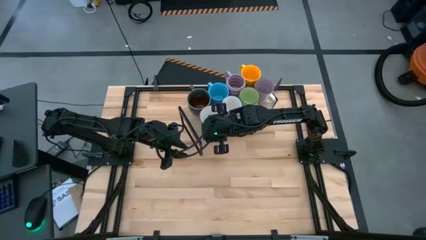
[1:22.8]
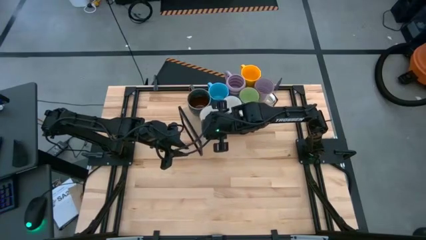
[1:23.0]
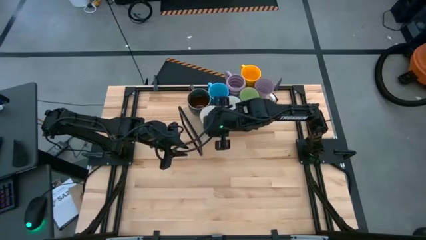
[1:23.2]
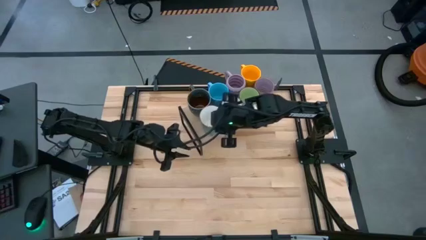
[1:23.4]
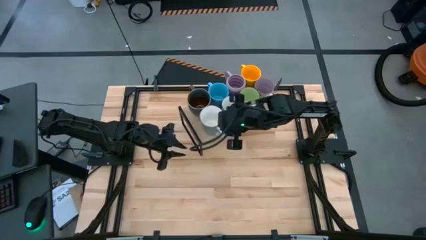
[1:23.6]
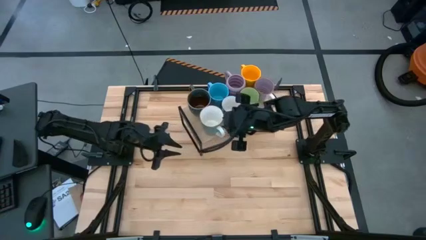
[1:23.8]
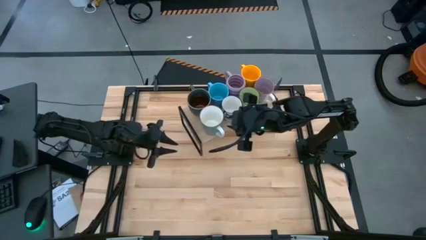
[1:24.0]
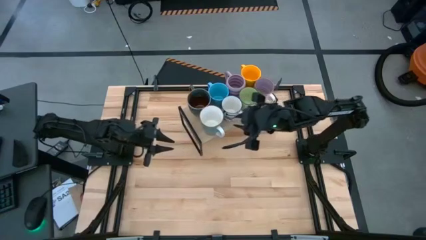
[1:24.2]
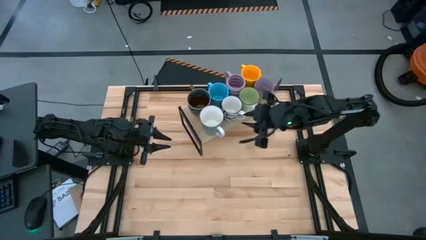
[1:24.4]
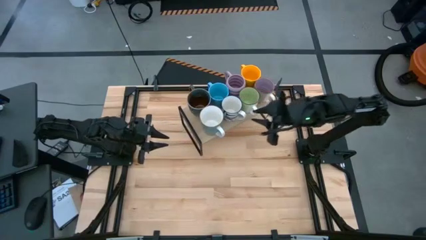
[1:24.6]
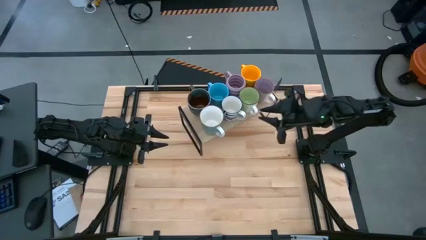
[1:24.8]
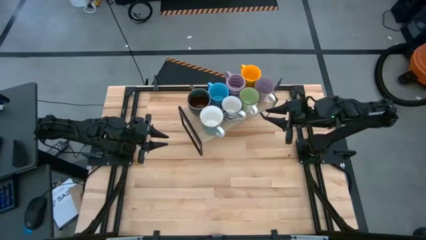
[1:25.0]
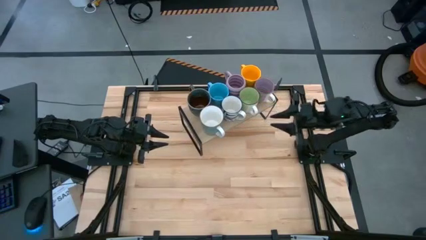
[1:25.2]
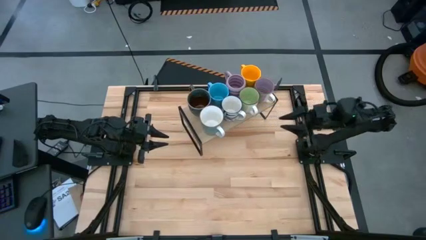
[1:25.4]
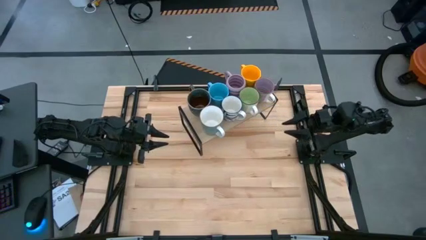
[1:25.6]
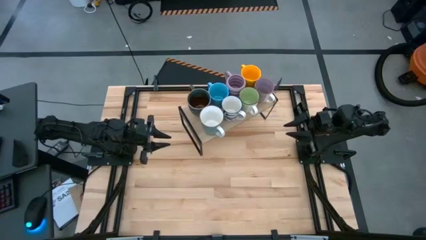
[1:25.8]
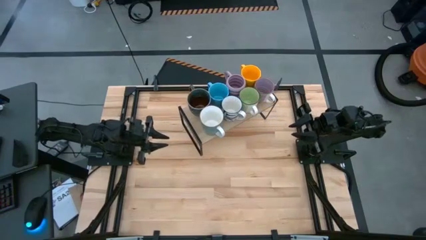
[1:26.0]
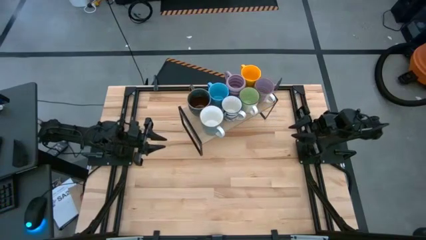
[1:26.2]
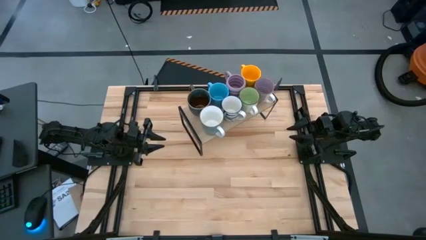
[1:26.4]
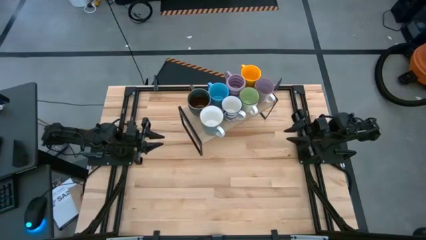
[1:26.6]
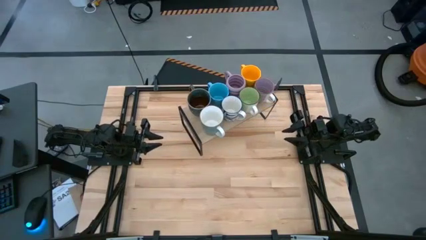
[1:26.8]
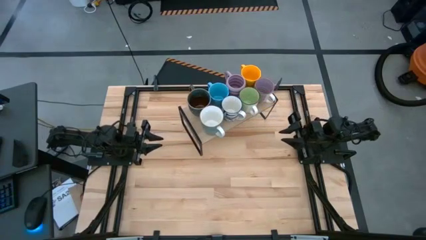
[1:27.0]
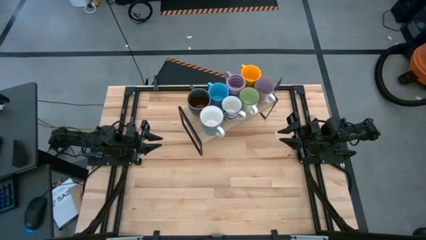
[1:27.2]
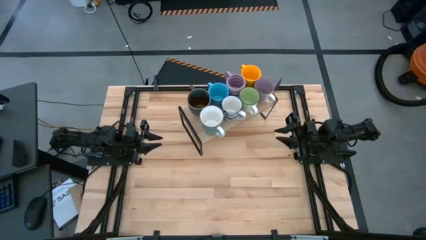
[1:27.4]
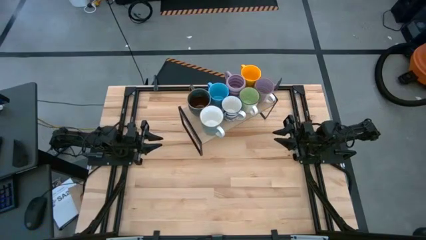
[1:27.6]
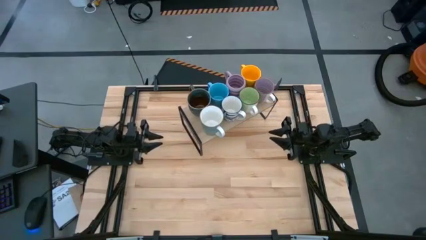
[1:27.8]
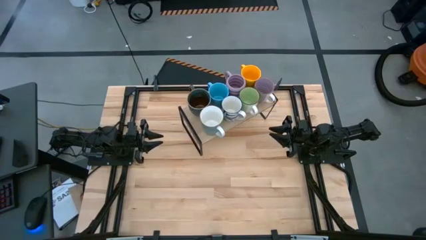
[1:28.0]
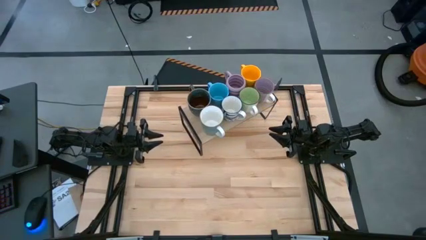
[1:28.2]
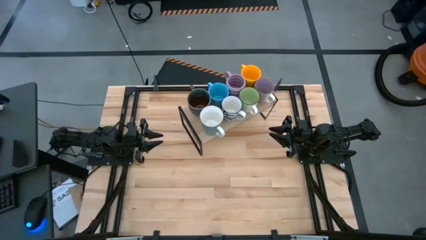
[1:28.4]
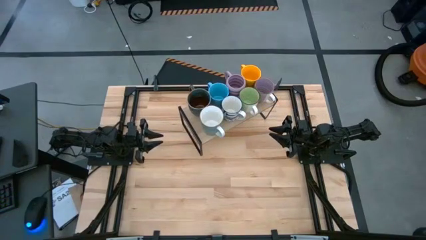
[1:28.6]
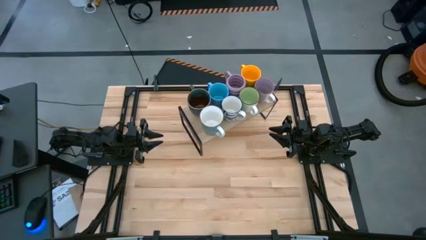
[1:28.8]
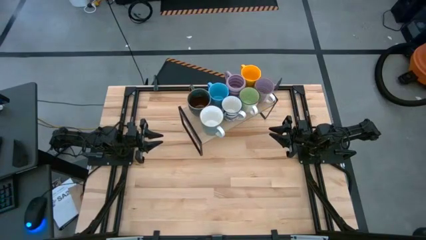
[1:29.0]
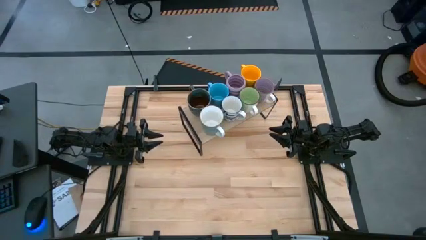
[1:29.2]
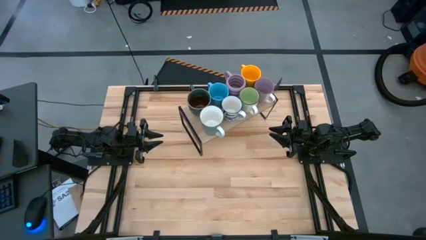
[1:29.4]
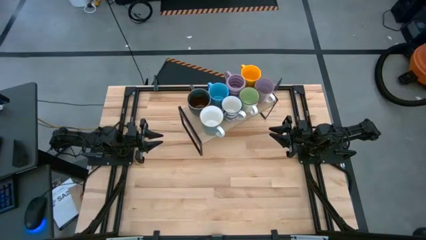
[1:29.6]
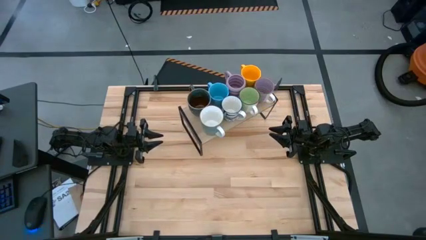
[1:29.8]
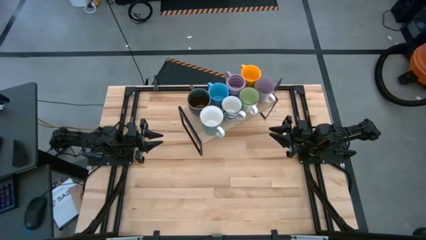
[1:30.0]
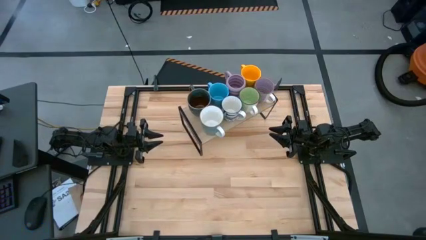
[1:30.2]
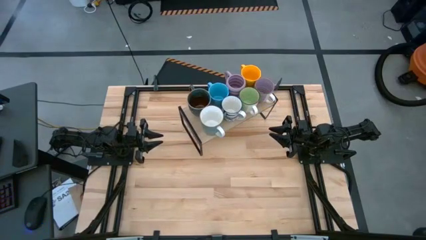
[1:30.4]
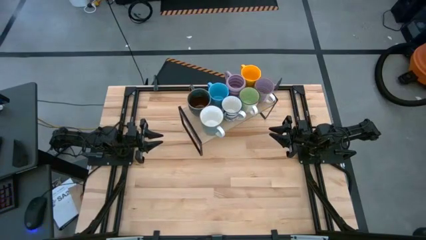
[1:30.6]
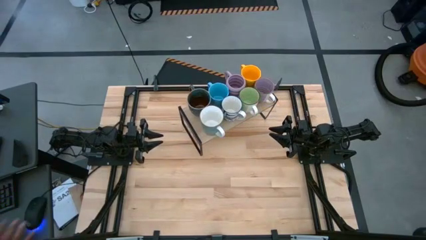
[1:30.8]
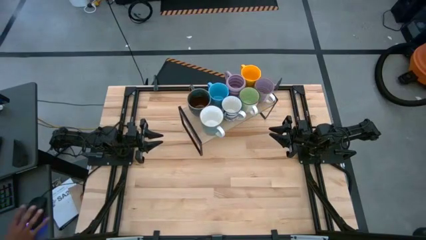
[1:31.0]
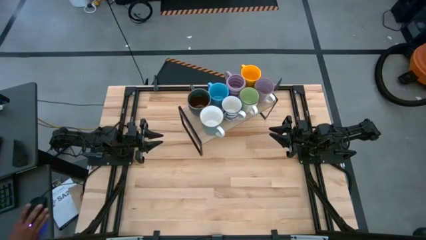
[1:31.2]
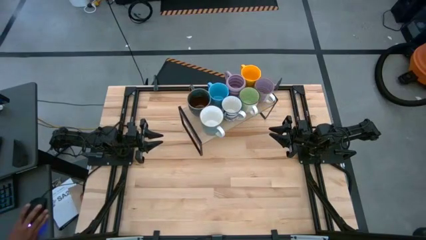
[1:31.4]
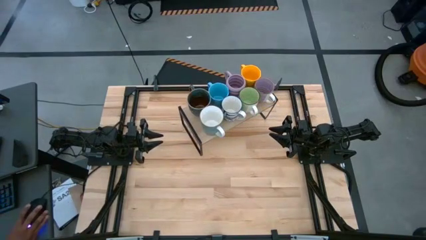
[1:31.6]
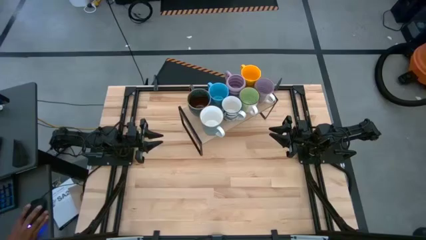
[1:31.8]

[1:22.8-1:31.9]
Task: Place coffee mugs
Return to Home Position

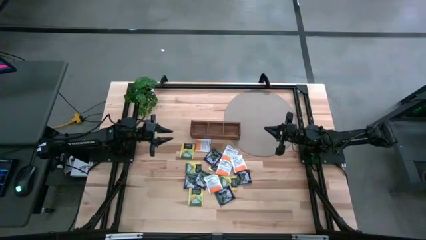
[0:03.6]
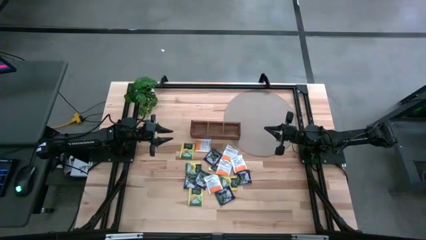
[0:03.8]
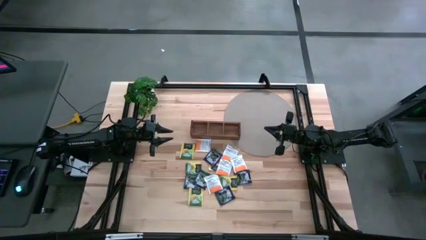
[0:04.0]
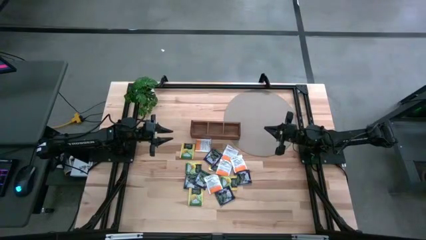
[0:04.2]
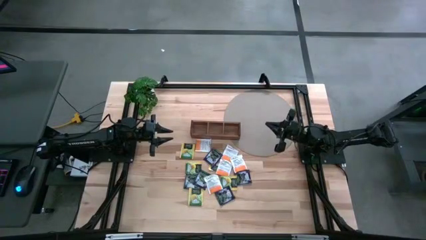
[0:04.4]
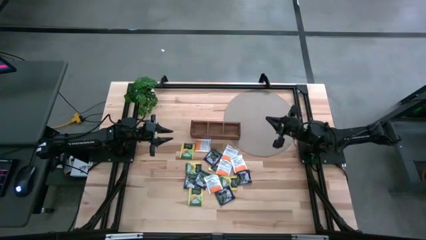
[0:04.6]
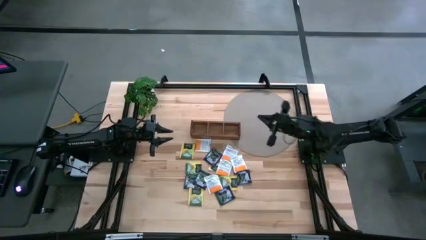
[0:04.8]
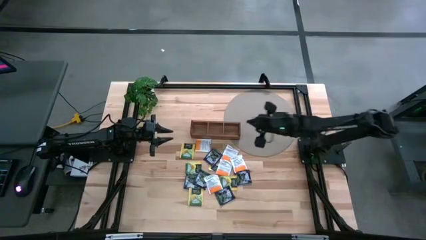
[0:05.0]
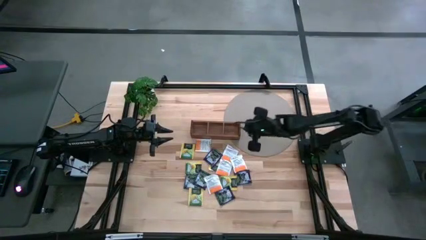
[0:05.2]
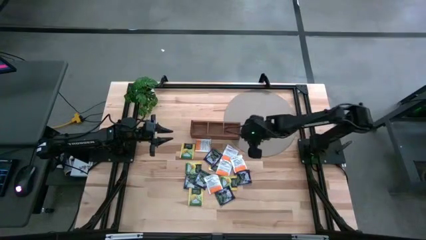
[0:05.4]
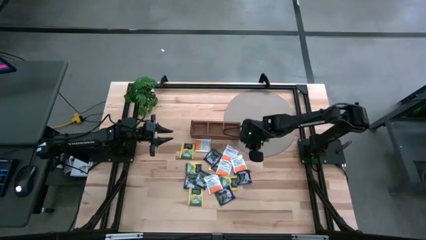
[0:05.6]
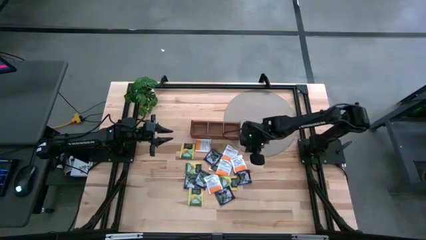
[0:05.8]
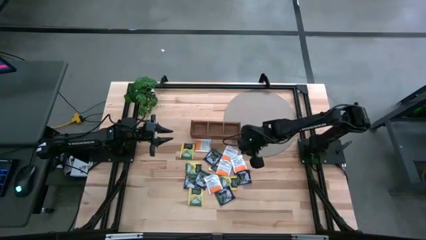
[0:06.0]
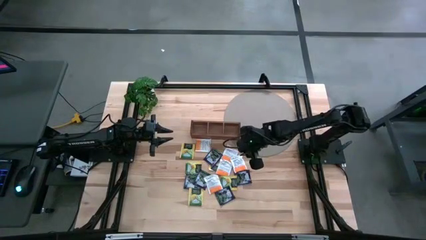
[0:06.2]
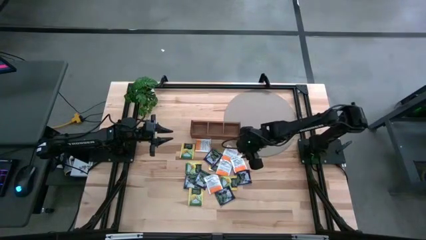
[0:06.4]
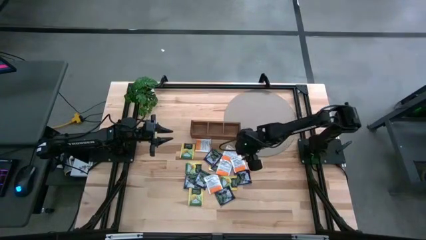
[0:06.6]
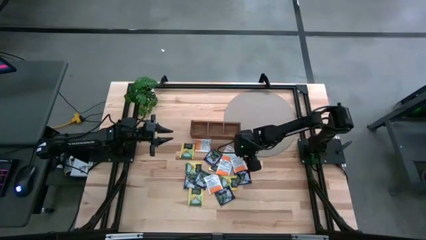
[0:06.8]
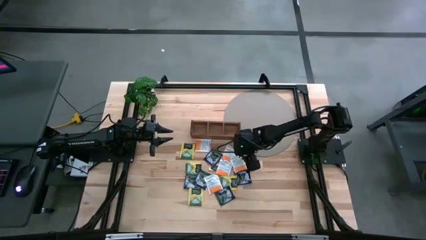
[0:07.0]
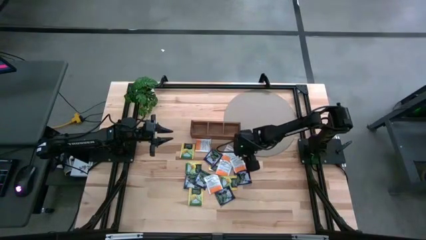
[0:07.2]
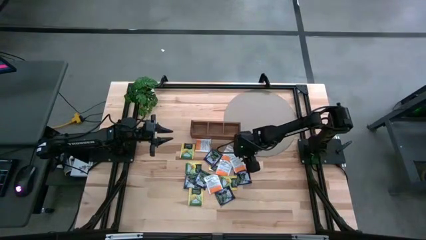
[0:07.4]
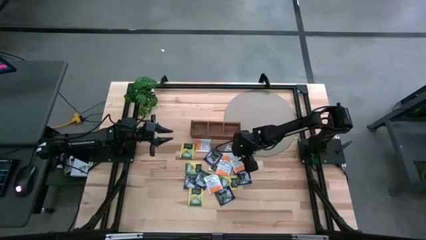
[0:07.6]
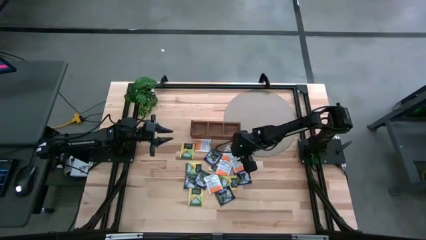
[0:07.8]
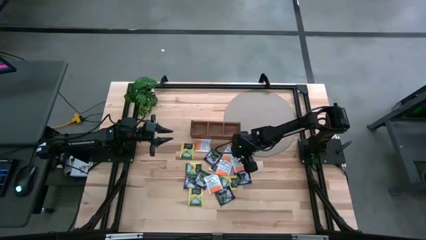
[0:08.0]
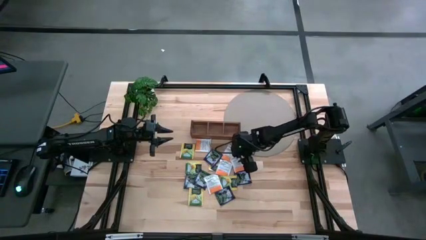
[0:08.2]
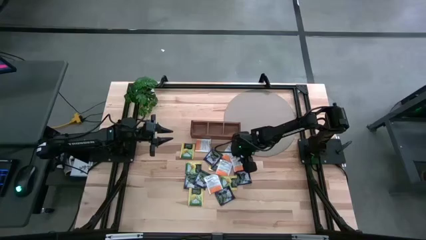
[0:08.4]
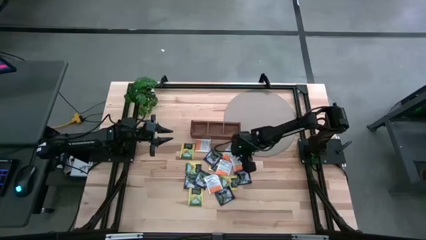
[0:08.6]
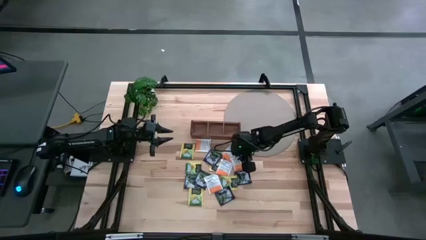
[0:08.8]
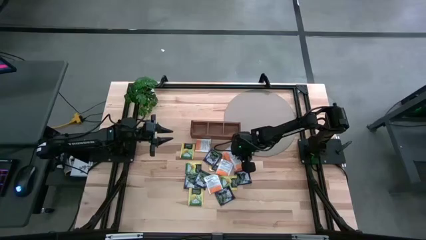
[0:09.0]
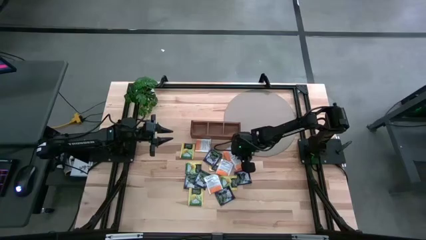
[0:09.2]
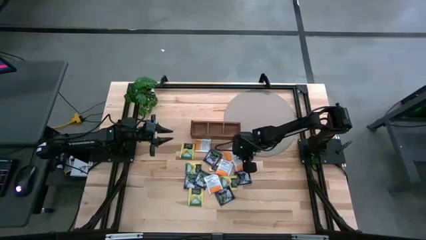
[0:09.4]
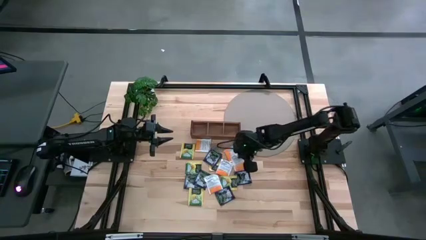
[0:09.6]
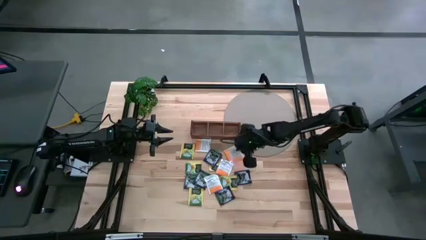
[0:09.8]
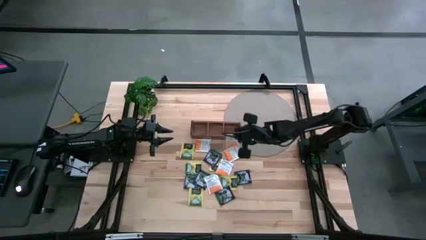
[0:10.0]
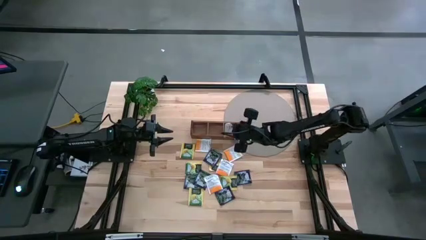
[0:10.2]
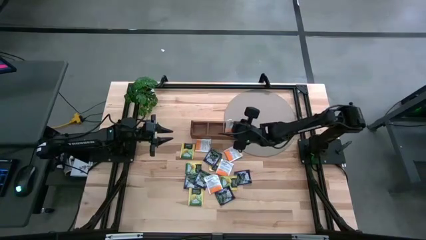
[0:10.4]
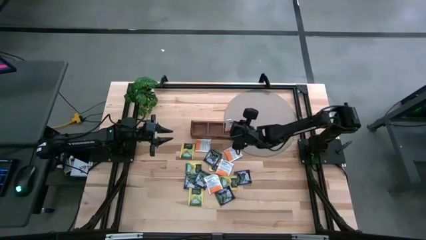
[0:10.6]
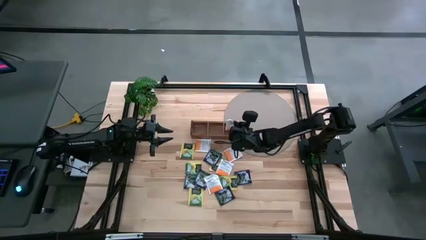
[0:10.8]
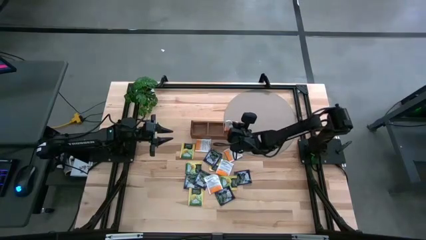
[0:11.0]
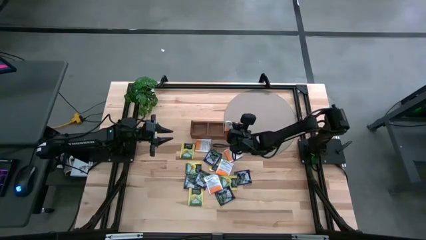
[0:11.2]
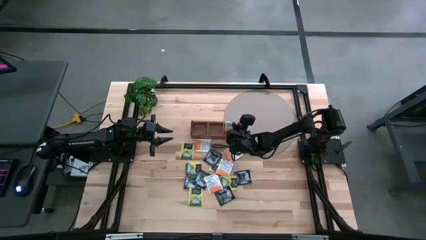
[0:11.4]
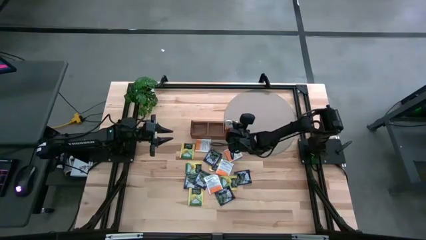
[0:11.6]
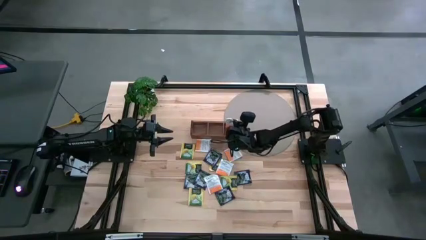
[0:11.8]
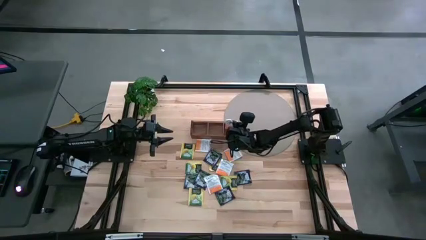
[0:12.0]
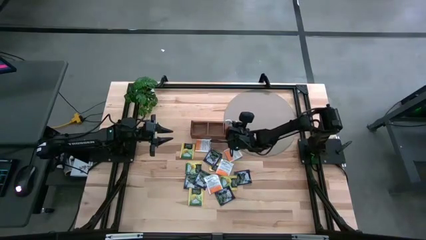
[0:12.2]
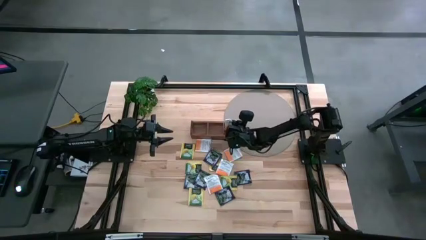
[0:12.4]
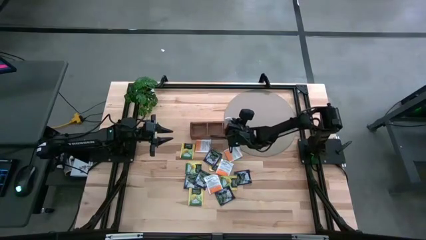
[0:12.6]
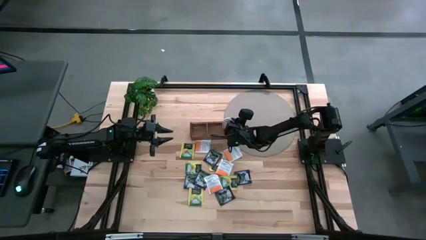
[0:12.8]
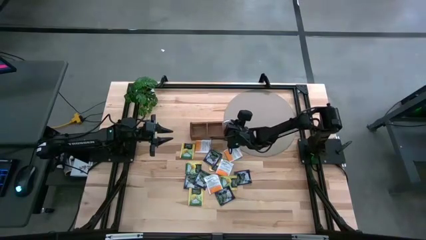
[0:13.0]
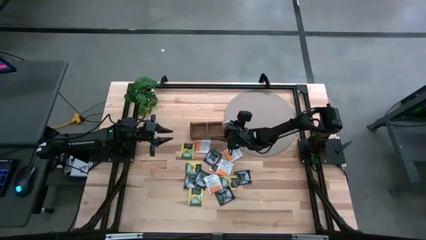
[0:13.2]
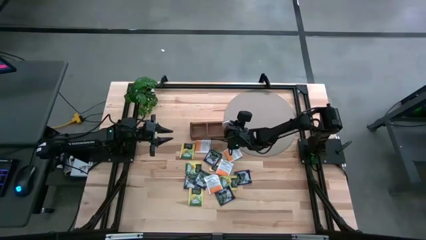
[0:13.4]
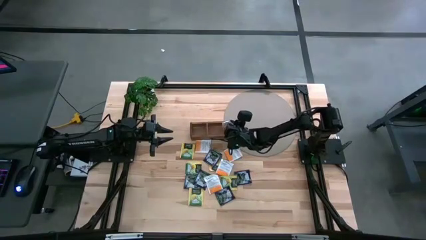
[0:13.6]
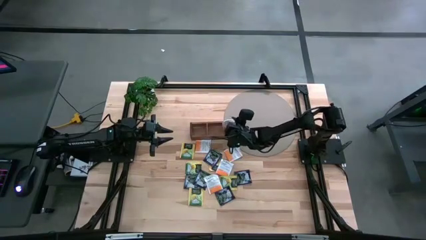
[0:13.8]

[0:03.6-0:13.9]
Task: Pick & Place Tea
Put the white tea bag into the right section of the wooden organizer
